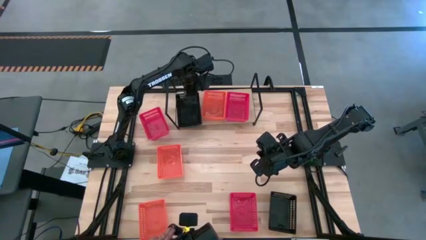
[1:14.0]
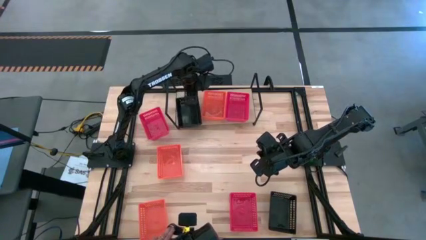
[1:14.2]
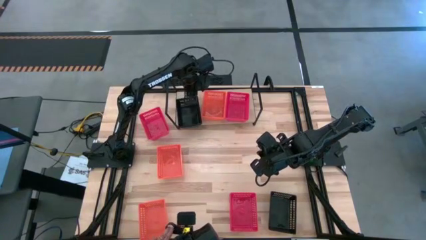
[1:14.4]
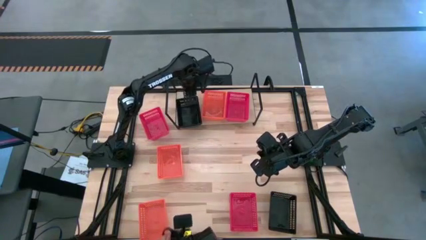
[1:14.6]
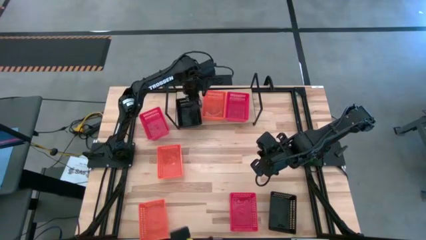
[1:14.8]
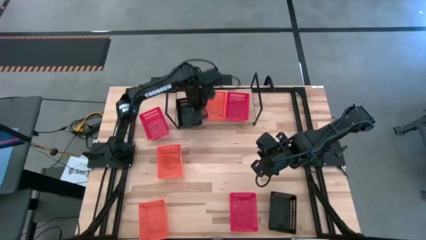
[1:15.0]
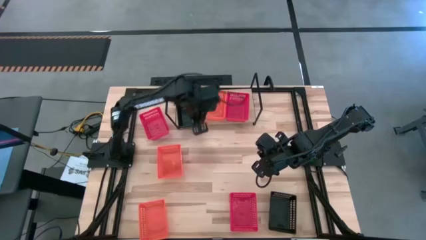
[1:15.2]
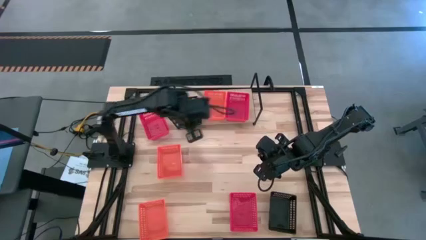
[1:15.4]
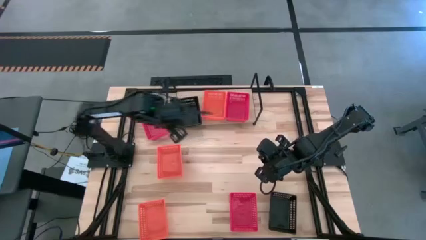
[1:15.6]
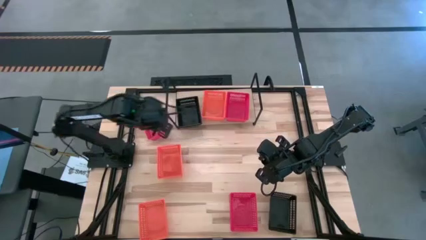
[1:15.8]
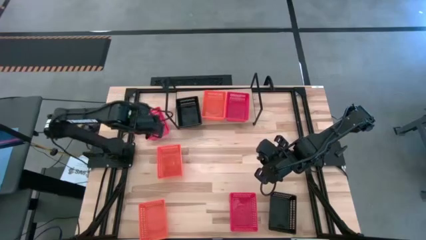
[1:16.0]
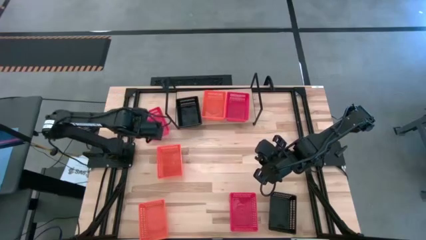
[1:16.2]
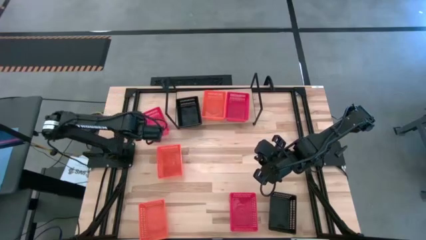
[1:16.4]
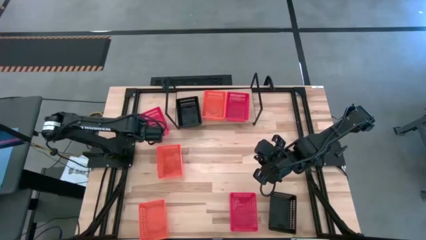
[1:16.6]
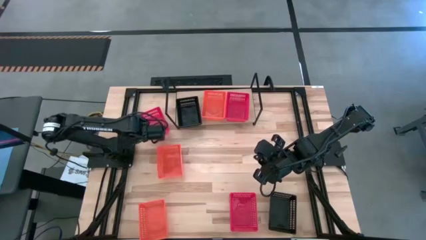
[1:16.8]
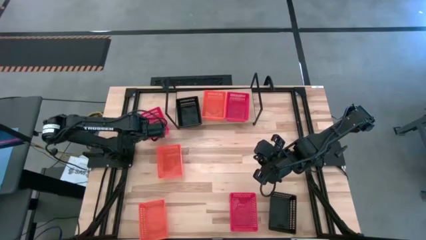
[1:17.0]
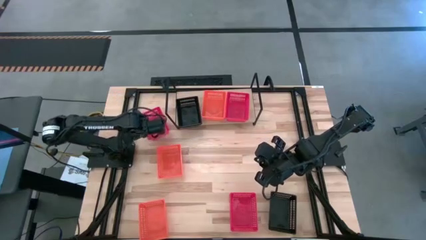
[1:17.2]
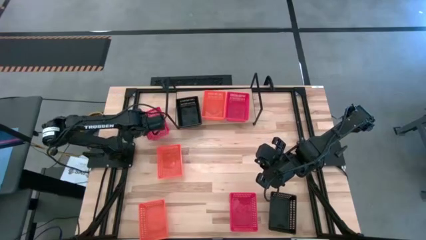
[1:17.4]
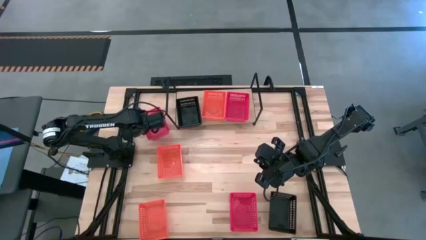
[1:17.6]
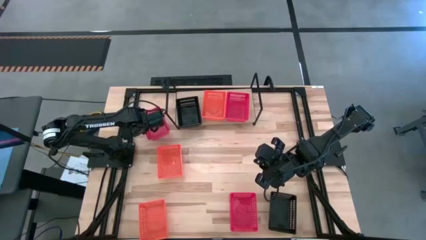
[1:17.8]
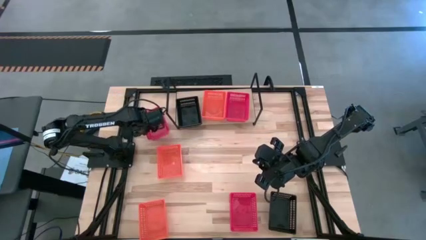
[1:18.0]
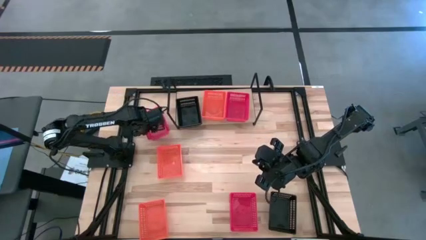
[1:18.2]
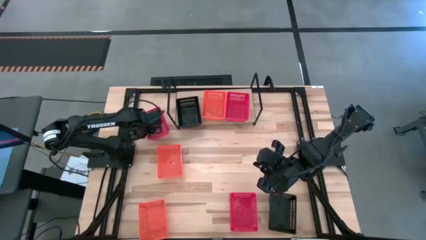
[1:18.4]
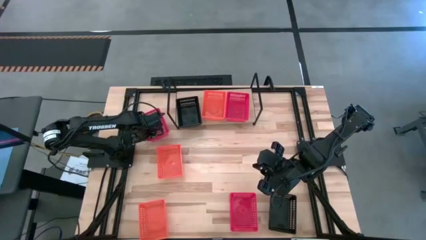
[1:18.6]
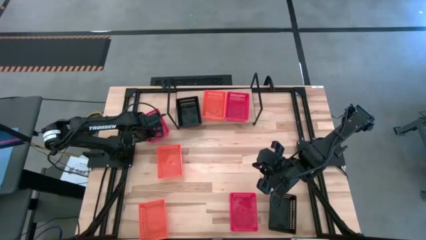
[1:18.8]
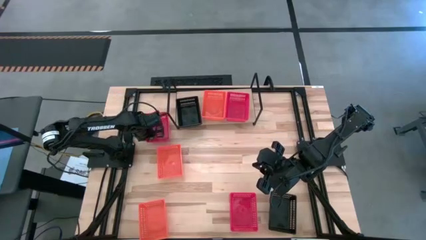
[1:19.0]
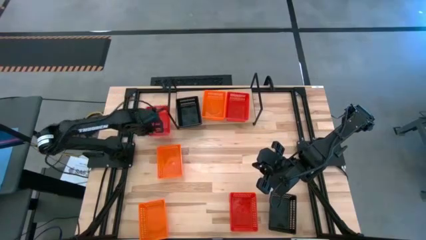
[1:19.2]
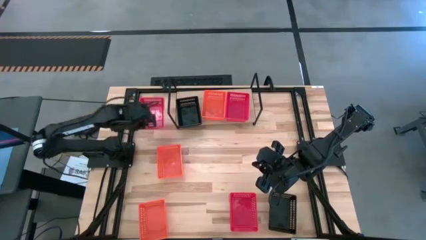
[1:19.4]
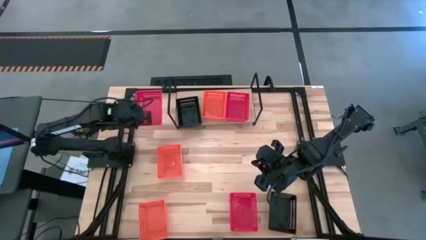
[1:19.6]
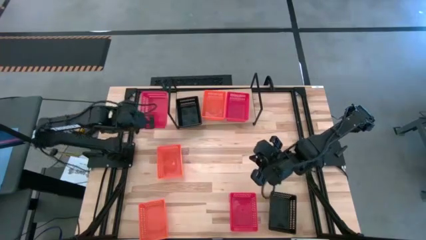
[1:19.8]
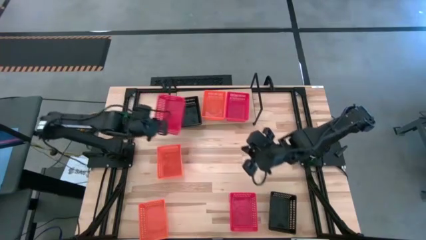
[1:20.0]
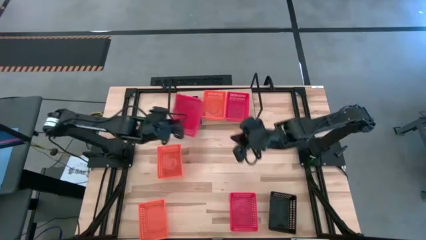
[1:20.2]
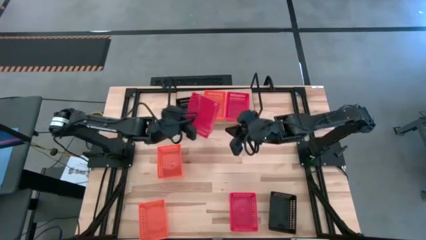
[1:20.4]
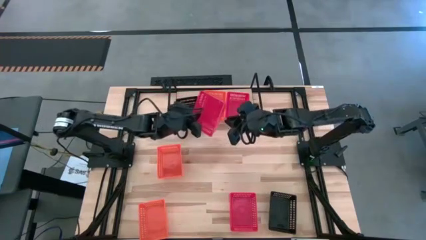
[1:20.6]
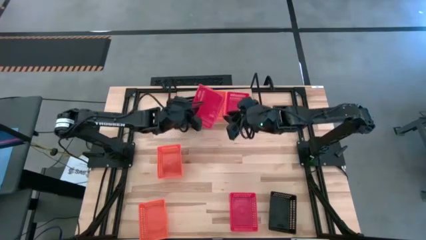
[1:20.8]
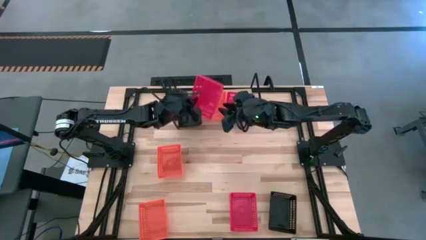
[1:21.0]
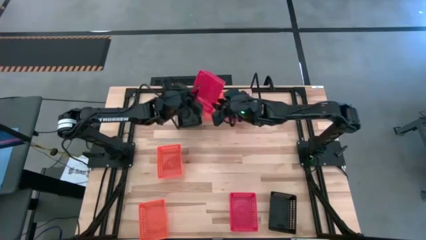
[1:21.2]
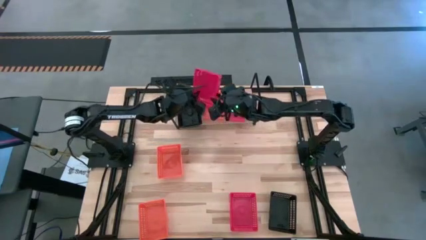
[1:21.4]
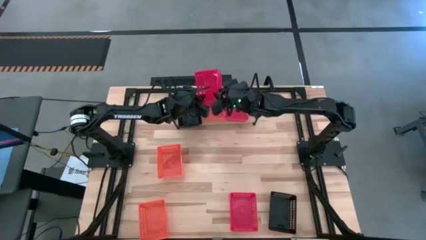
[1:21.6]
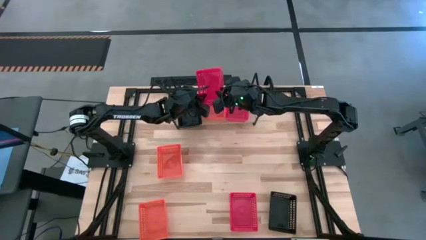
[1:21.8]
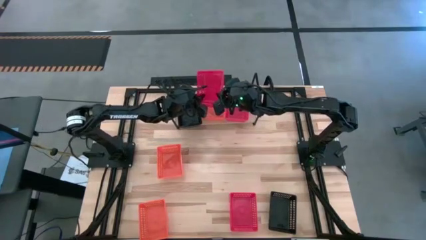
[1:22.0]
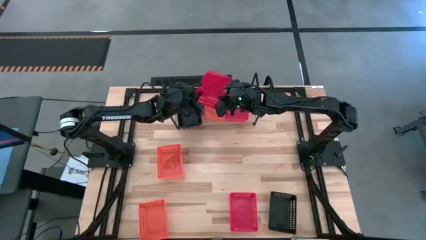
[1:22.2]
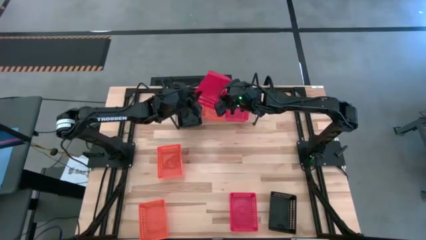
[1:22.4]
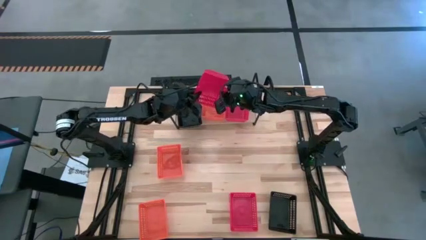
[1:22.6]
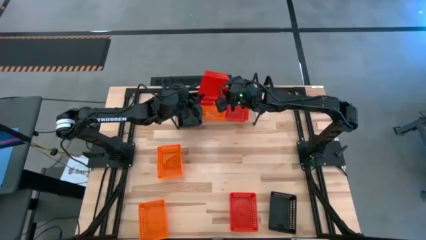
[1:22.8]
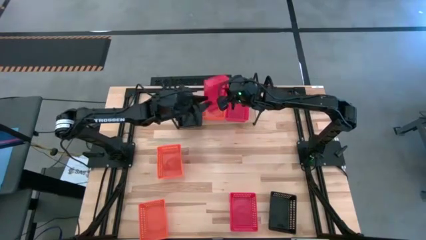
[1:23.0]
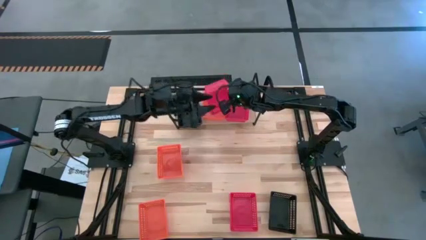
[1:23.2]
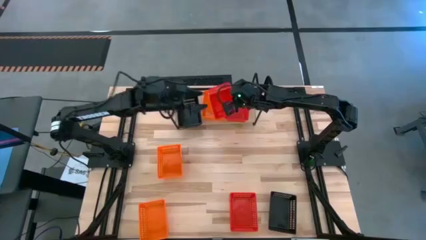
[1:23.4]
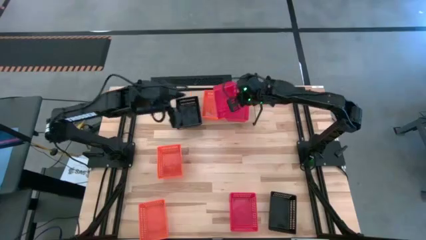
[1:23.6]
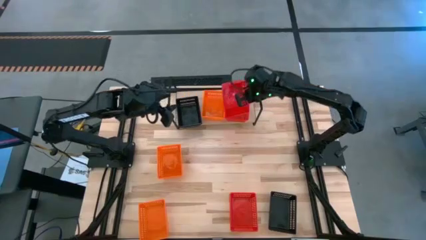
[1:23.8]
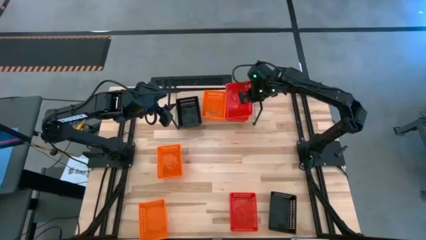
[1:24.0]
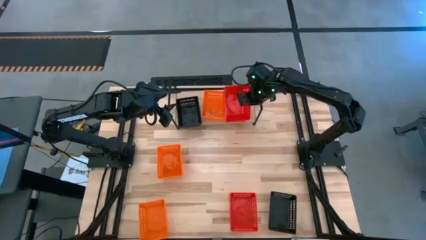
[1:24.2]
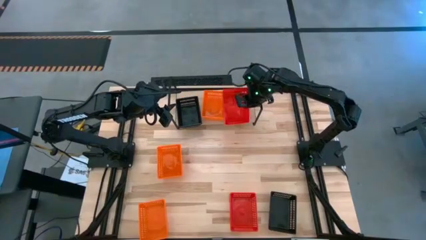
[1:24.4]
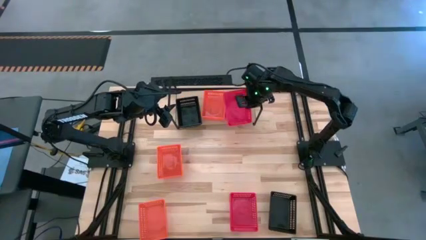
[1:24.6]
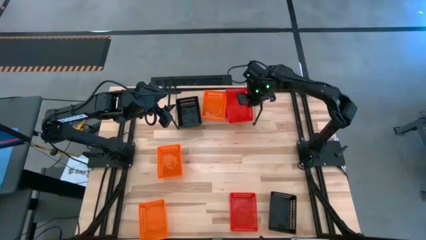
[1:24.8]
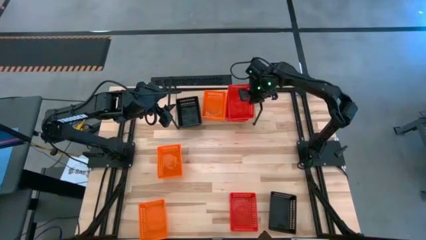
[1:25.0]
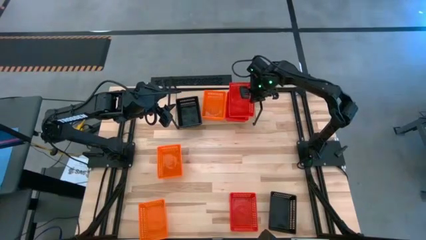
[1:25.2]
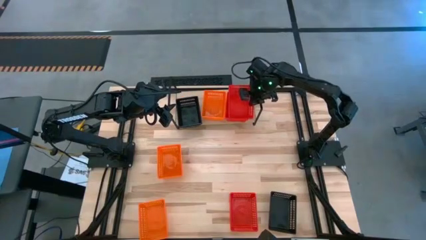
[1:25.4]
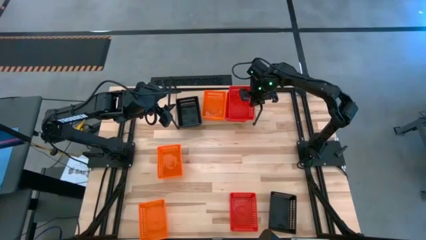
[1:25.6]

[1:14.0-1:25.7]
Task: Stack baskets on shelf by color
Stack the top red bin on top of the other red bin on the shelf
